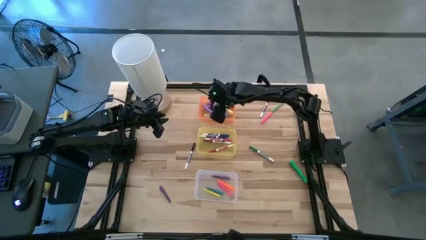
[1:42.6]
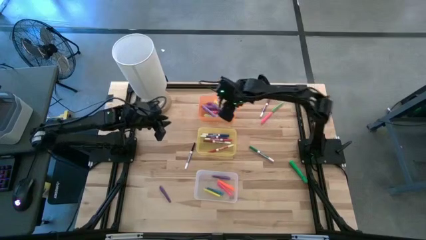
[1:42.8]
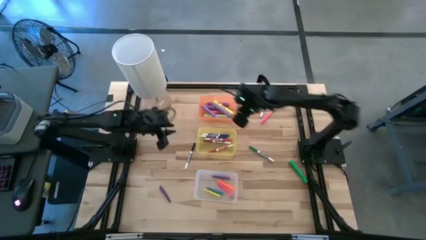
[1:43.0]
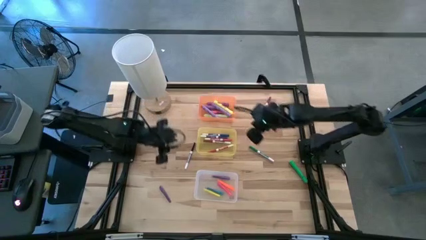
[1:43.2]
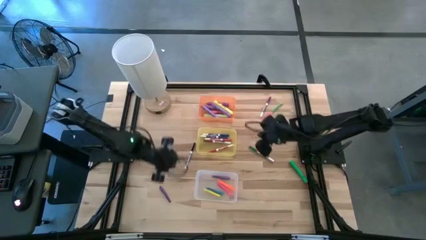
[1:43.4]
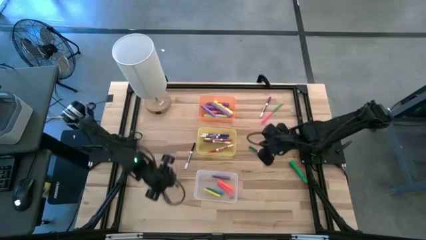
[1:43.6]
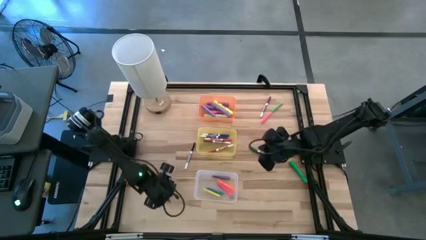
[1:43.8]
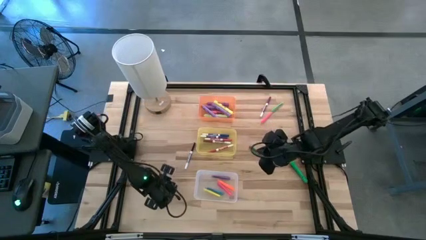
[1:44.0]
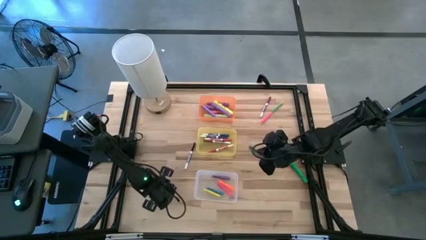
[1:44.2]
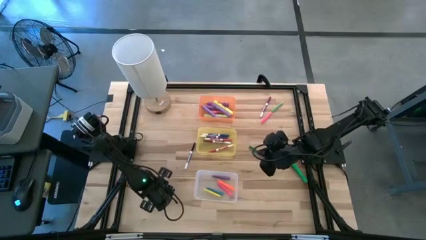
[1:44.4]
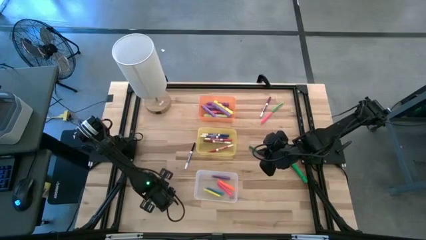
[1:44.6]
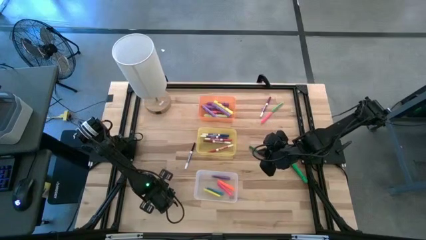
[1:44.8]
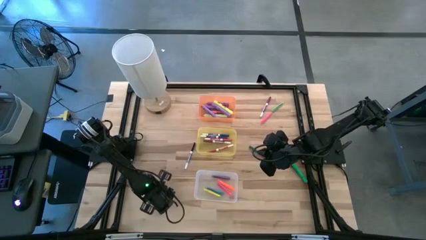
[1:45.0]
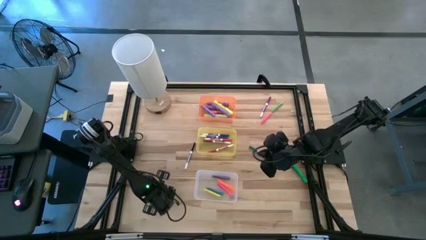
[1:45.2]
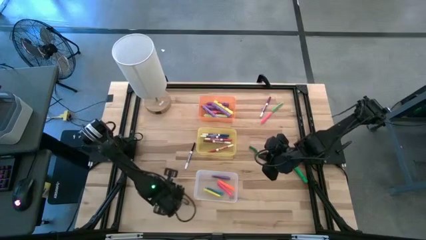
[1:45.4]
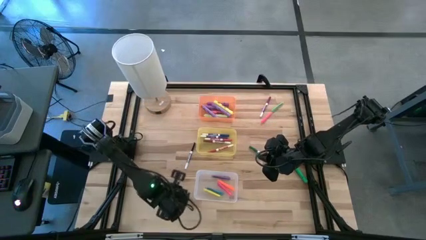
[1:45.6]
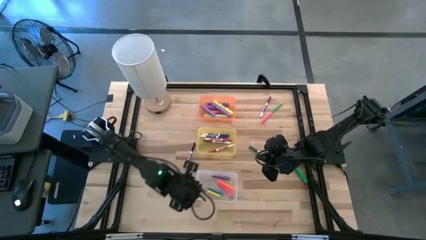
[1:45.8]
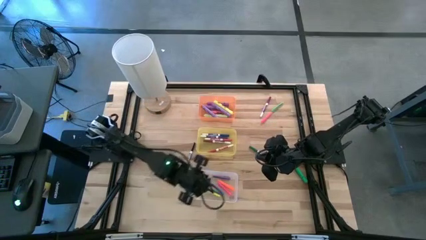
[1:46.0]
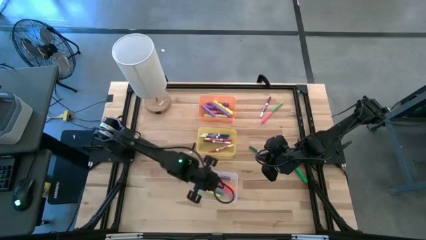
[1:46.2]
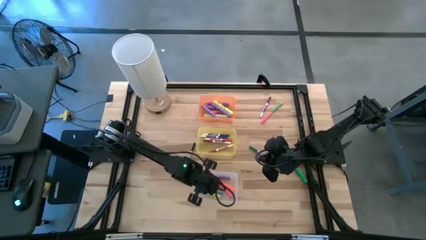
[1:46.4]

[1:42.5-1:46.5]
Task: Pick & Place Markers
Put the purple pen into the white bin

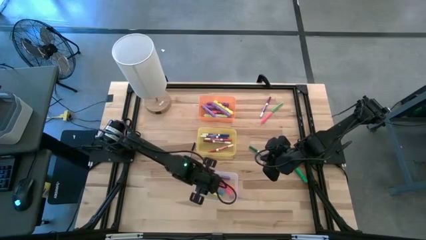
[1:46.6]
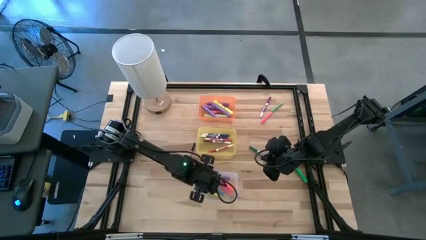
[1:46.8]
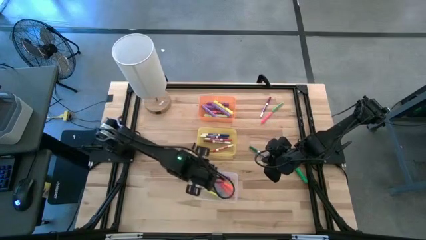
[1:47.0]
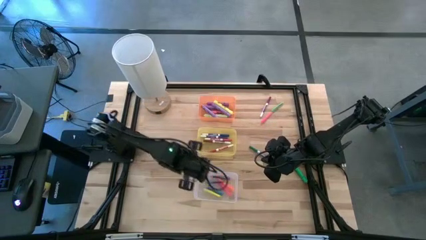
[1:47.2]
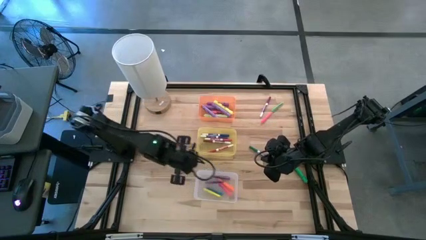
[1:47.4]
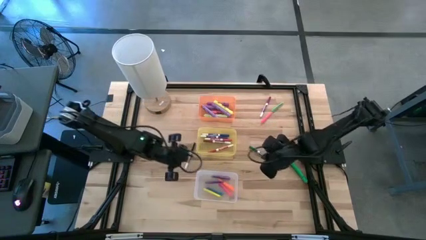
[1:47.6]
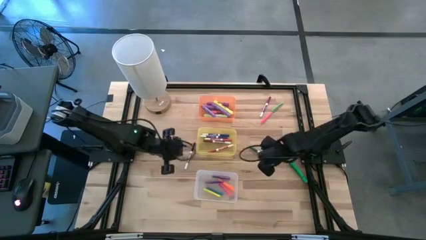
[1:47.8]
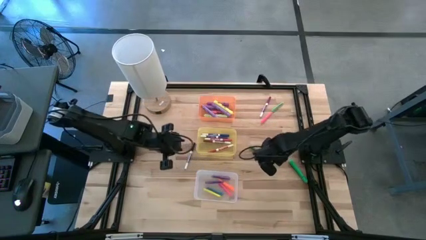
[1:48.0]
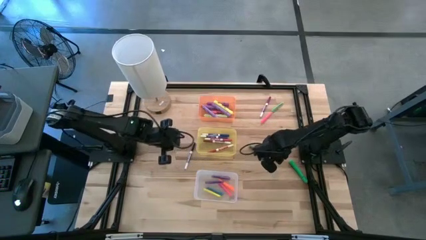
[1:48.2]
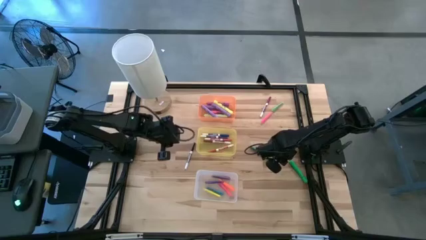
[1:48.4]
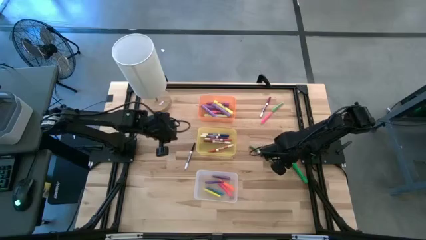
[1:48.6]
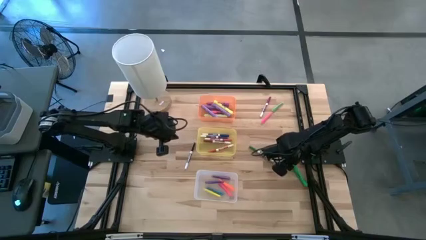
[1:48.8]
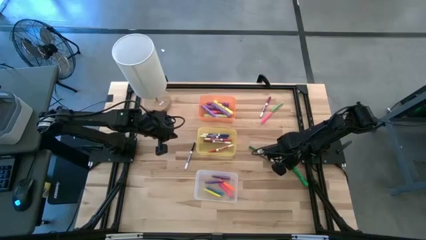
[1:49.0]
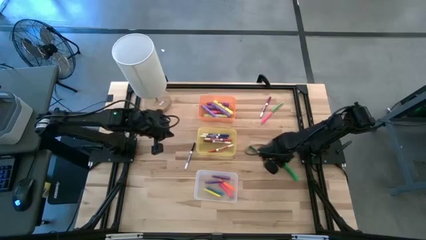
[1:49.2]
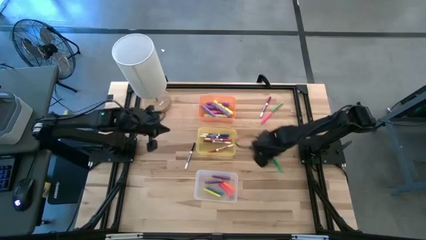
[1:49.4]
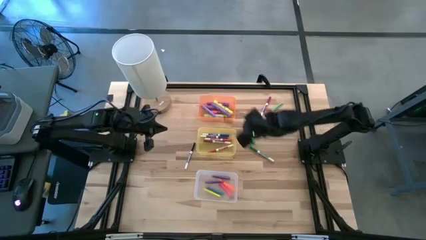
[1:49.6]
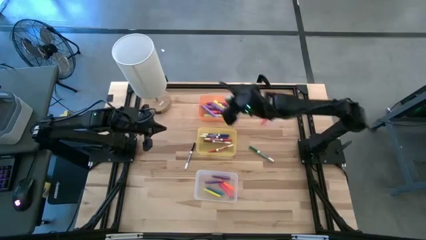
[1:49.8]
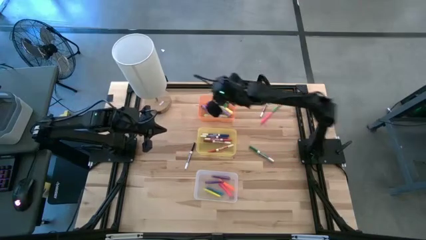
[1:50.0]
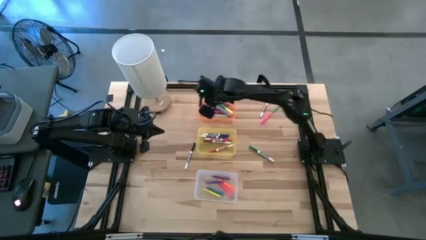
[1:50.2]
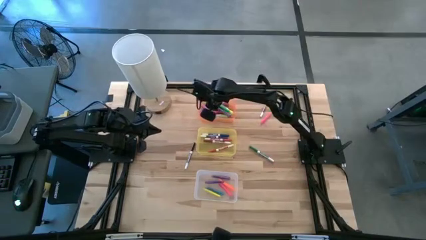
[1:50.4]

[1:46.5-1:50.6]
Put the green highlighter pen into the orange bin

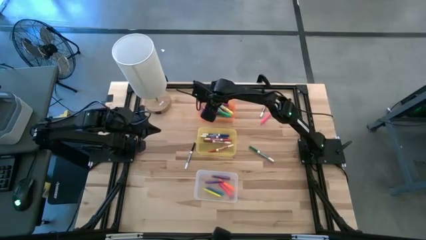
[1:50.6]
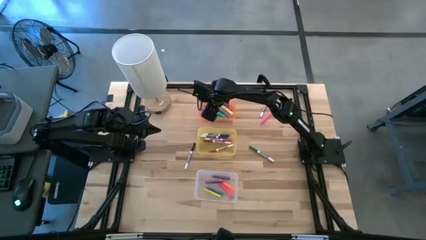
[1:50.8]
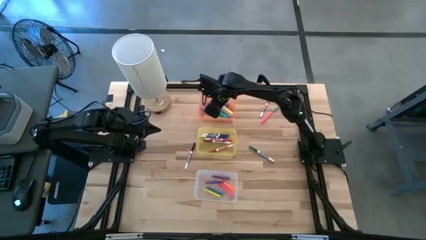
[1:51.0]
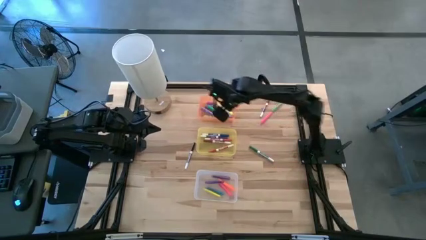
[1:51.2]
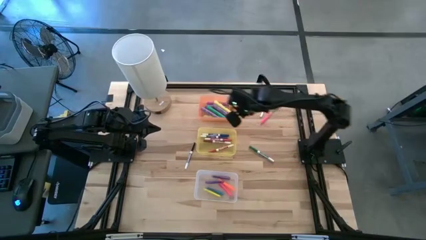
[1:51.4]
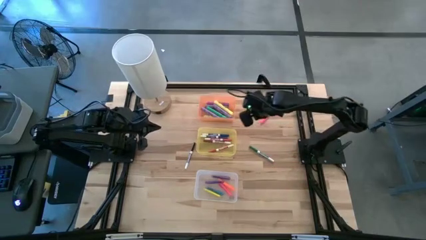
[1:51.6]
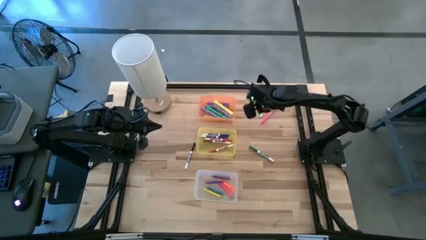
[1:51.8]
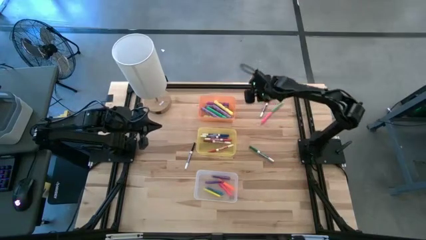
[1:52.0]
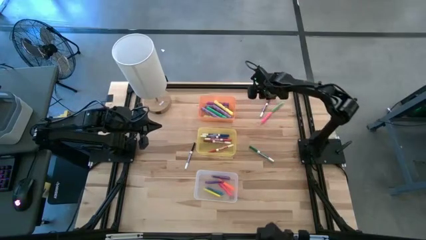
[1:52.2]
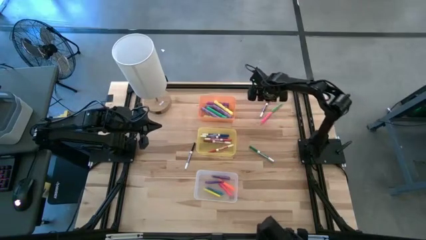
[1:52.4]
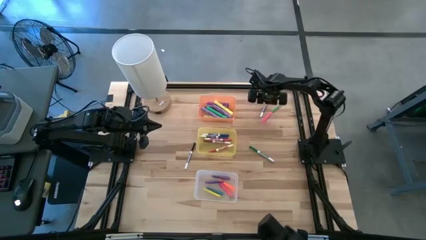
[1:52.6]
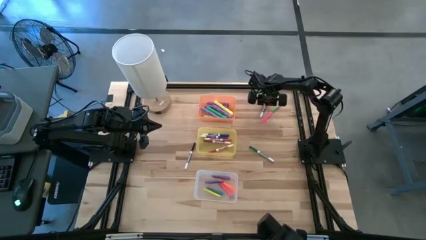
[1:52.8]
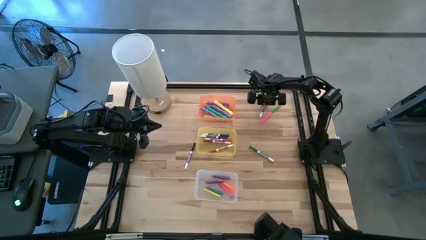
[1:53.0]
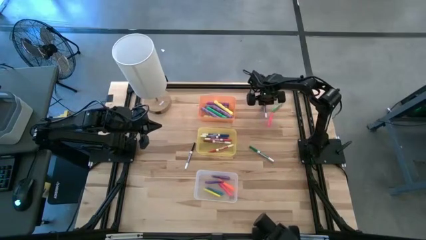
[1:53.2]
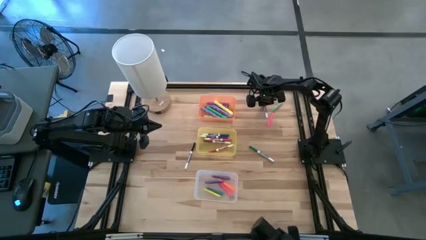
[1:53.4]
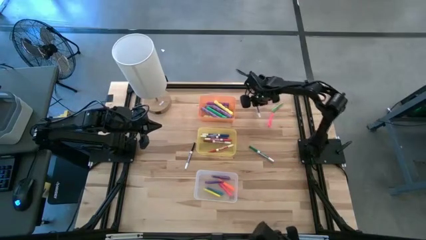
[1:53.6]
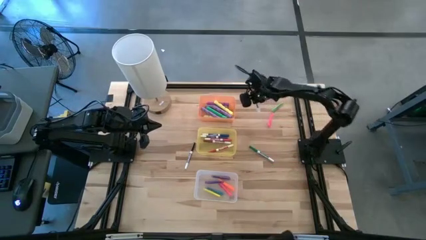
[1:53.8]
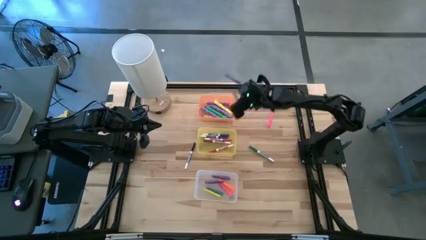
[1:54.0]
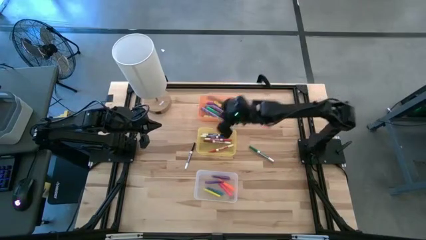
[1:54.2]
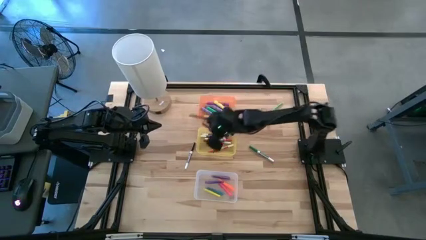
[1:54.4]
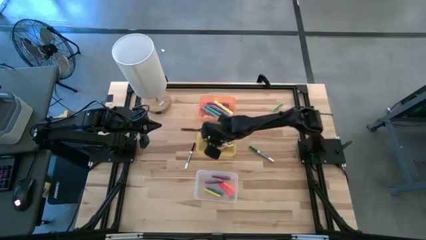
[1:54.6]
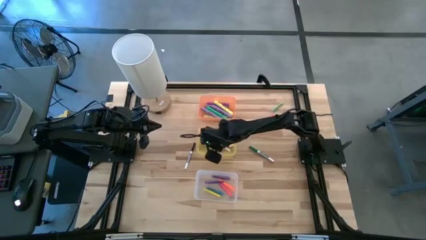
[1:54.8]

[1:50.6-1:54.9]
Put the dark pink marker pen into the yellow bin

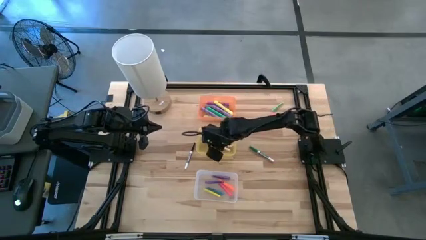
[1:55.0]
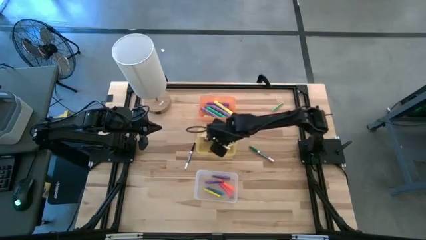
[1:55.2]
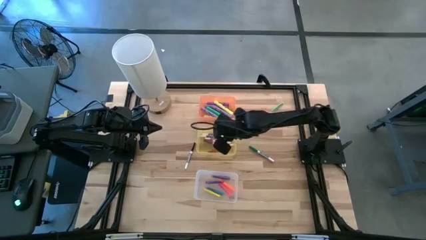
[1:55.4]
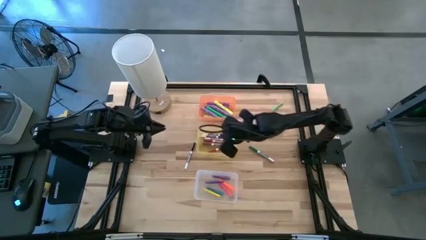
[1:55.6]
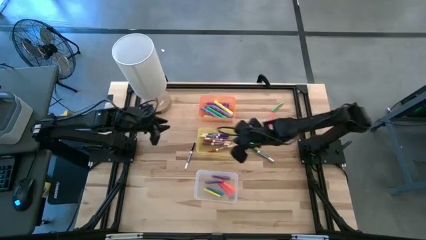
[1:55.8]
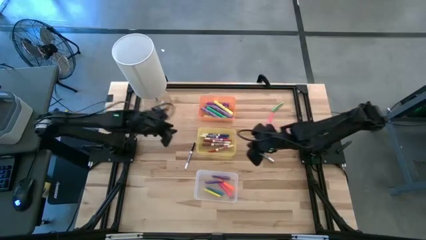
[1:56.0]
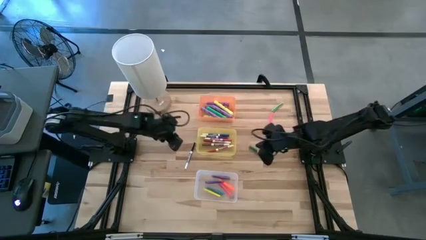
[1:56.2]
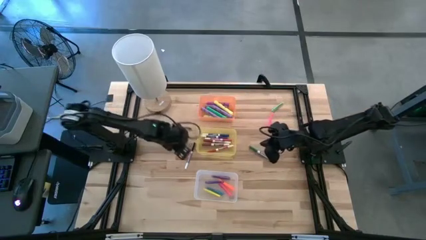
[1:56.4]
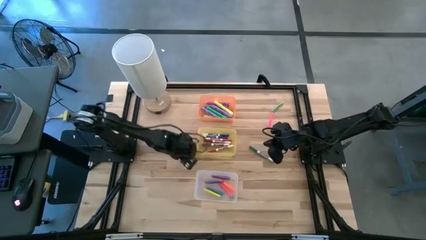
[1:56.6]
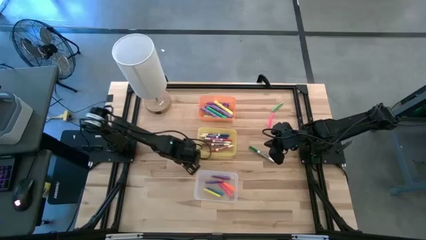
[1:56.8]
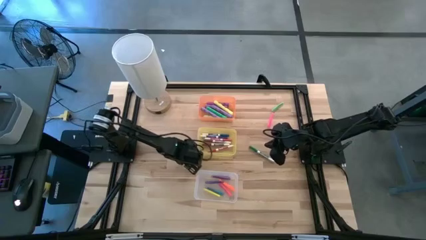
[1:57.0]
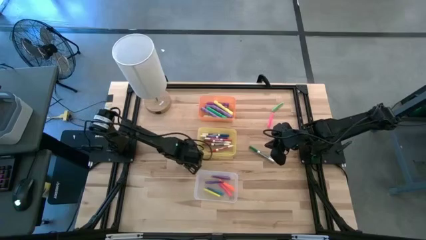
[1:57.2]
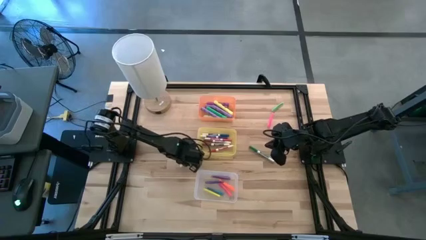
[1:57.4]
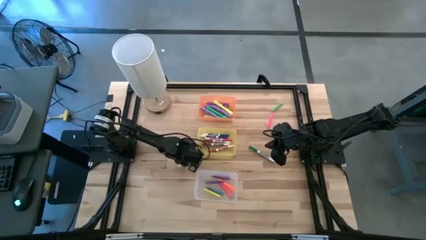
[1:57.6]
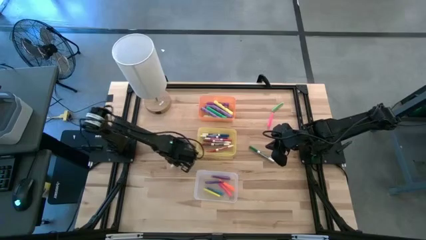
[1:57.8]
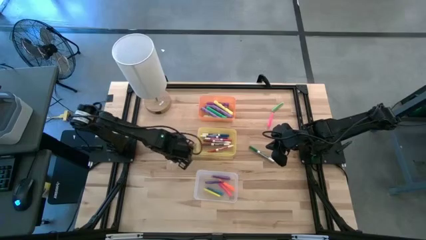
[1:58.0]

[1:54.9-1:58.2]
Put the black marker pen into the yellow bin
